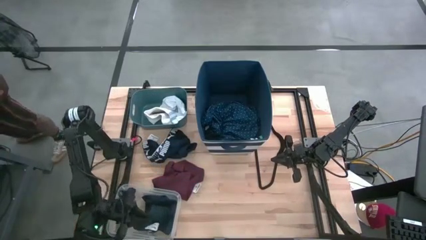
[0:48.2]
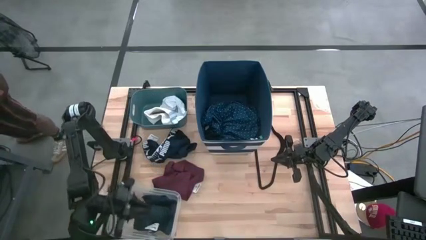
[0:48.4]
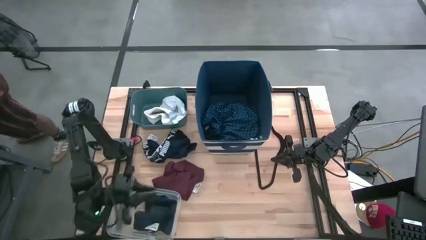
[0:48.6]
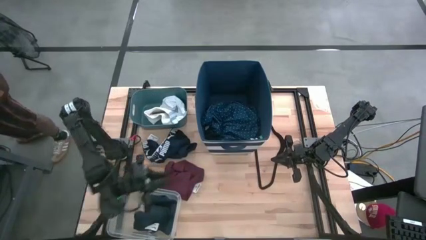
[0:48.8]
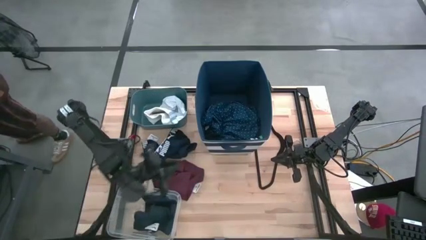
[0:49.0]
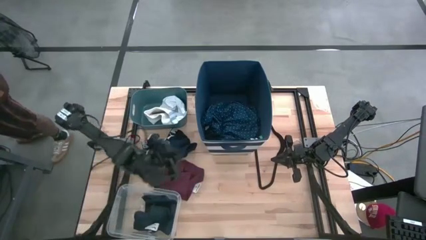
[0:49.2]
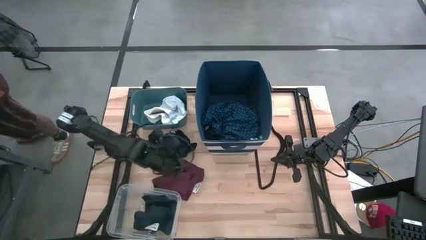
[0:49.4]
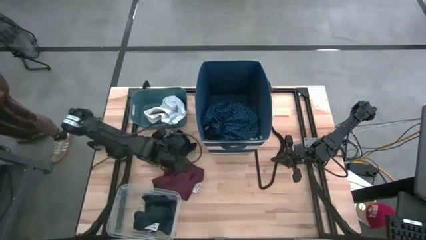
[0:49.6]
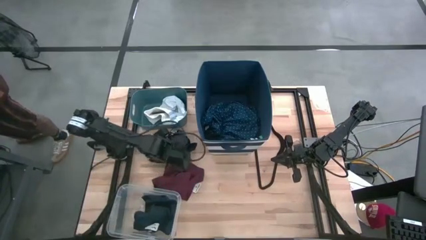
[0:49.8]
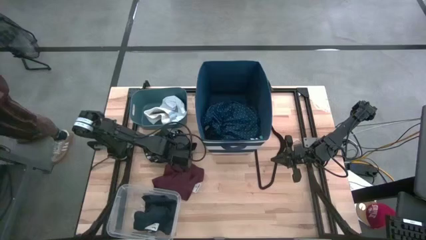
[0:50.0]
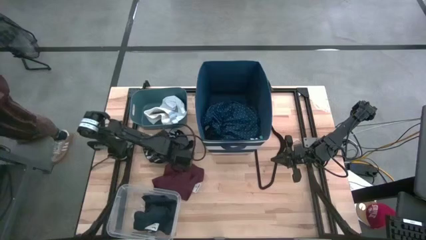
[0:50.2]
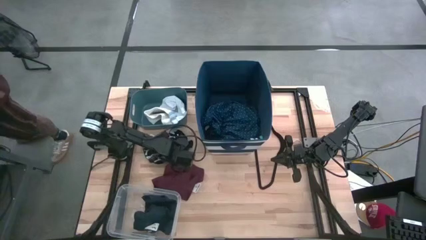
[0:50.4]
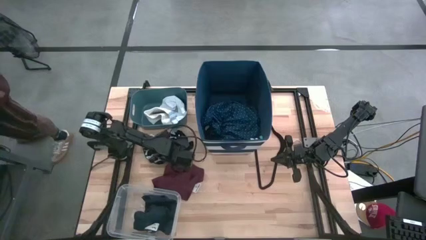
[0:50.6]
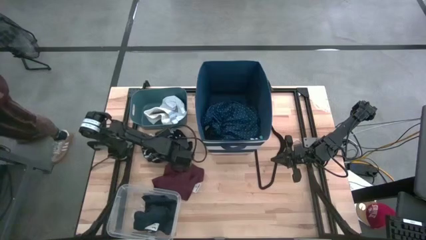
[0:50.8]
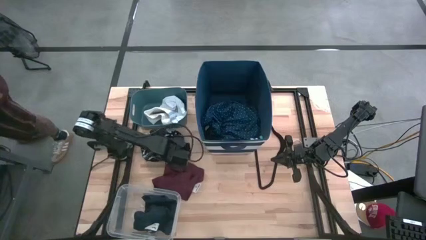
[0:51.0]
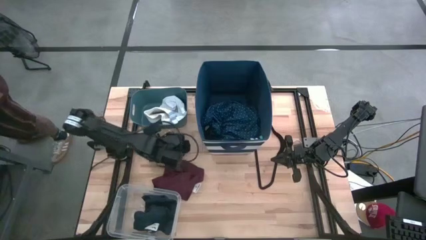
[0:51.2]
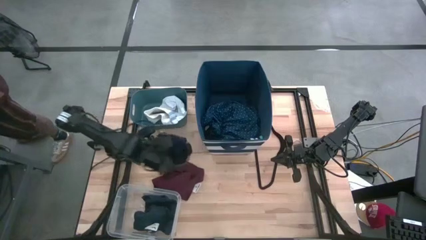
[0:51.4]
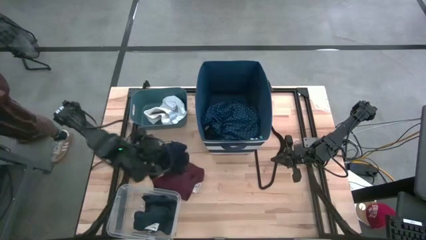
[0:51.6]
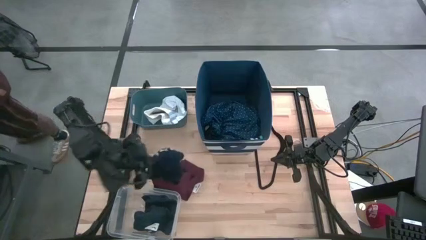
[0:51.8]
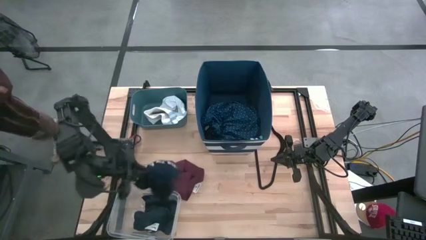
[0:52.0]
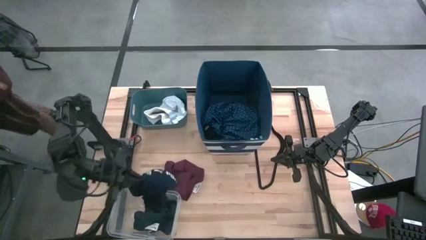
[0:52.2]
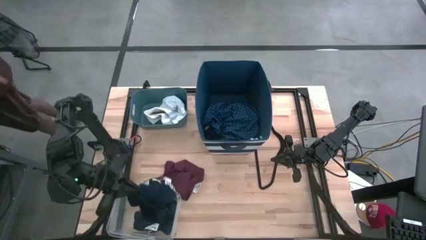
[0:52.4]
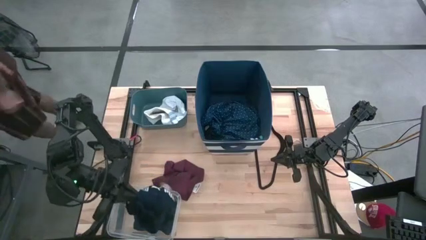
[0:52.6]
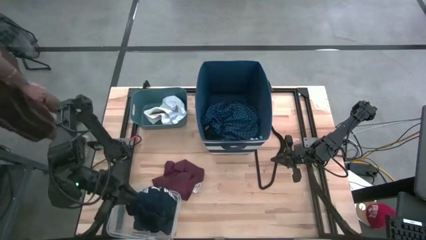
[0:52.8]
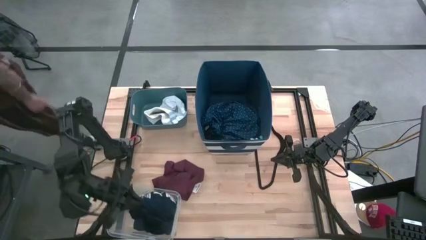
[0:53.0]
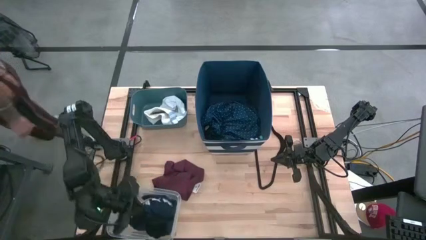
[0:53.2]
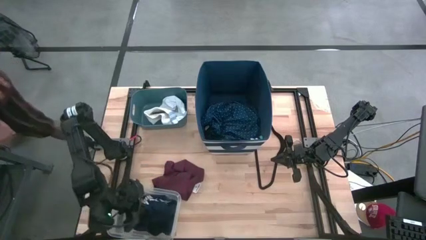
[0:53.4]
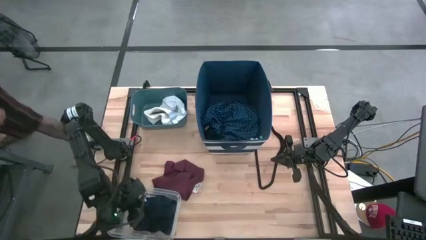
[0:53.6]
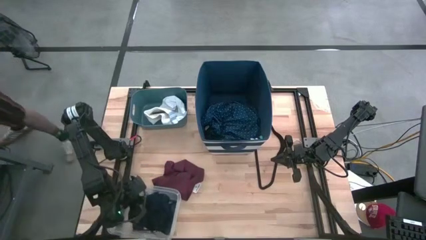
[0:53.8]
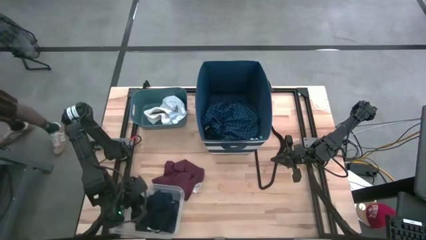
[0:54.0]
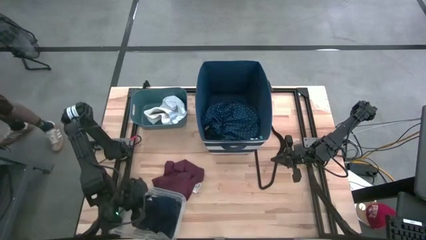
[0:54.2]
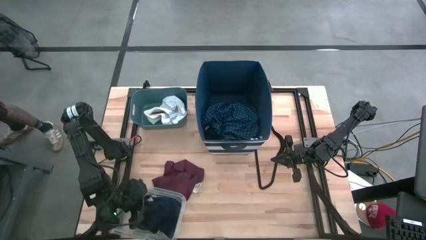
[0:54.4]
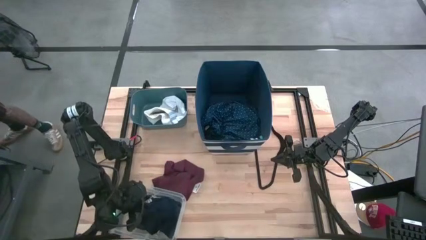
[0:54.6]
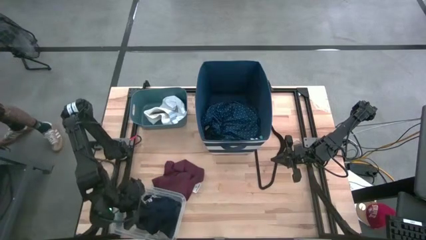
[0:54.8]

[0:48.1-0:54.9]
Task: Pick & Place Cloths
Put the dark blue boxer into the transparent bin

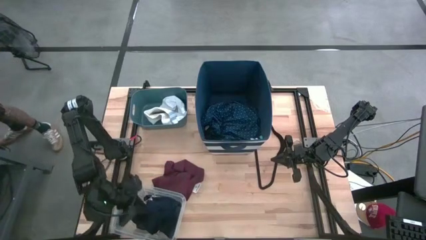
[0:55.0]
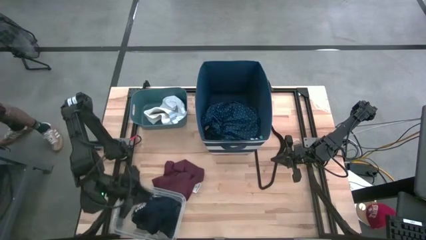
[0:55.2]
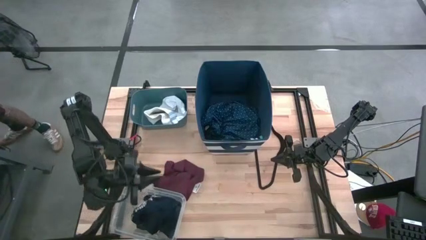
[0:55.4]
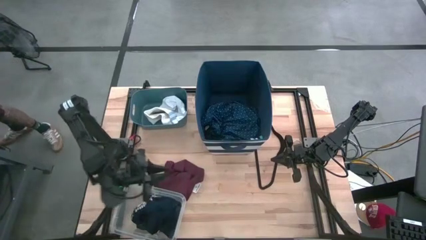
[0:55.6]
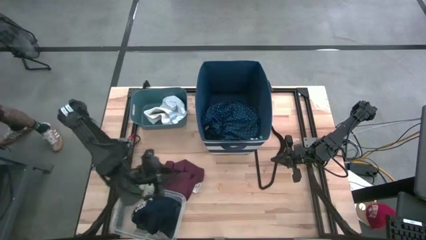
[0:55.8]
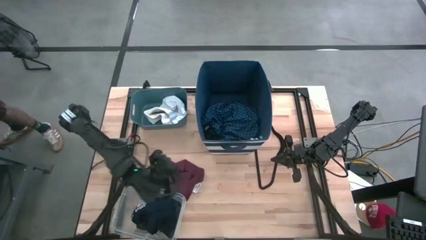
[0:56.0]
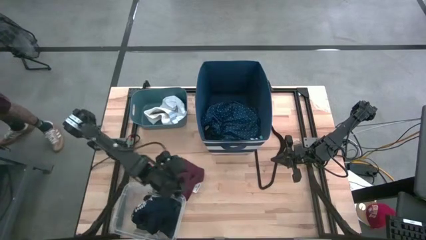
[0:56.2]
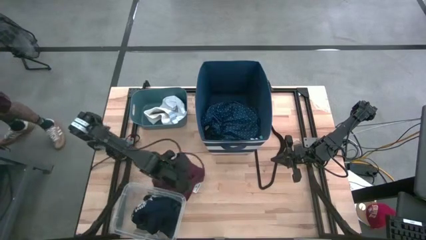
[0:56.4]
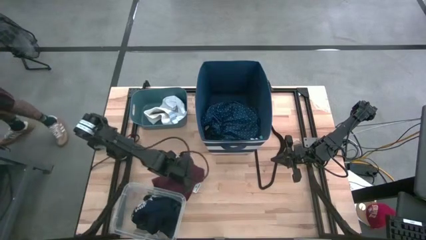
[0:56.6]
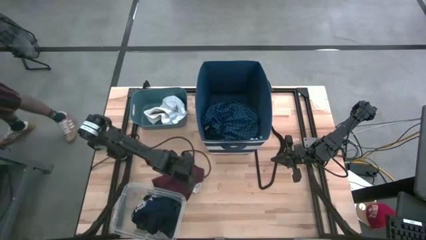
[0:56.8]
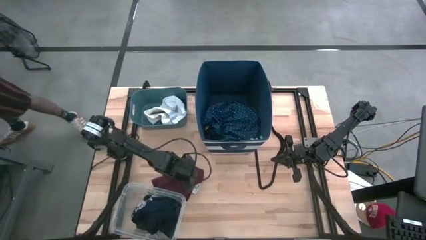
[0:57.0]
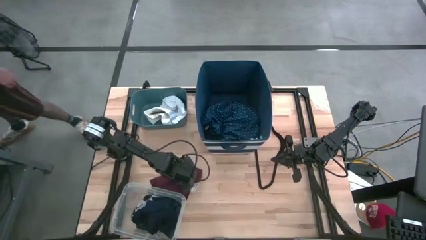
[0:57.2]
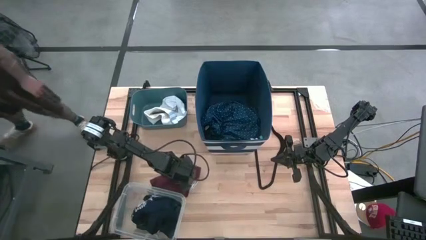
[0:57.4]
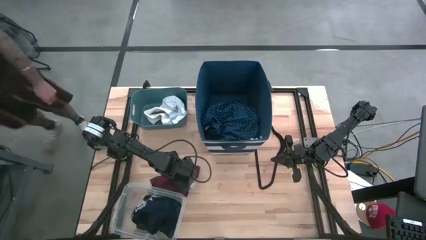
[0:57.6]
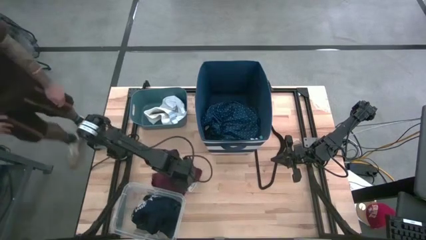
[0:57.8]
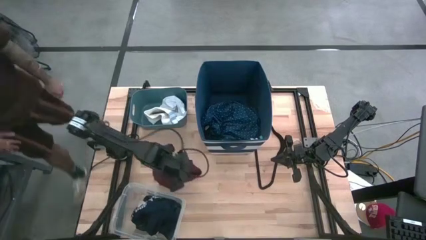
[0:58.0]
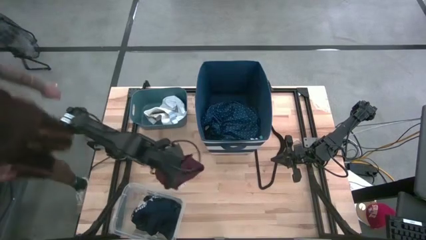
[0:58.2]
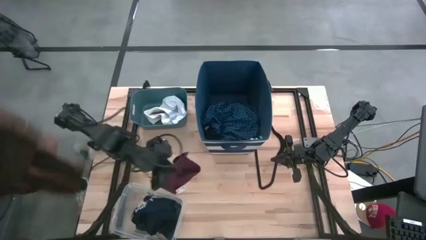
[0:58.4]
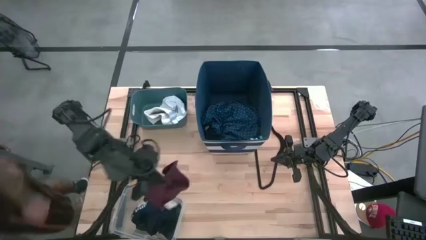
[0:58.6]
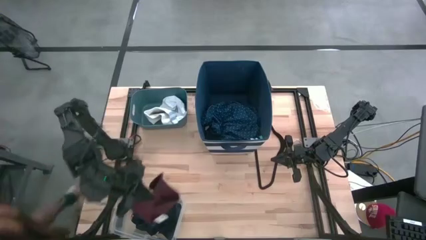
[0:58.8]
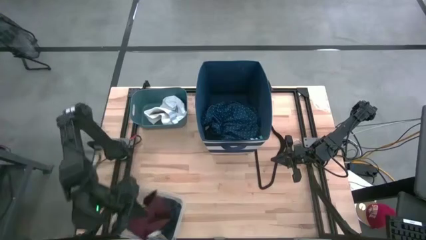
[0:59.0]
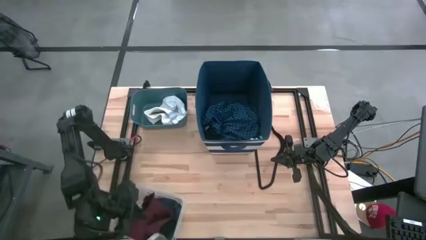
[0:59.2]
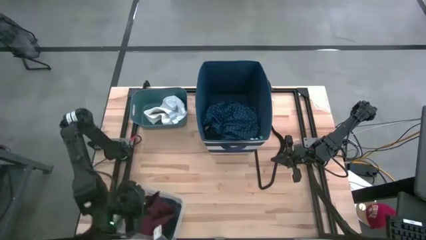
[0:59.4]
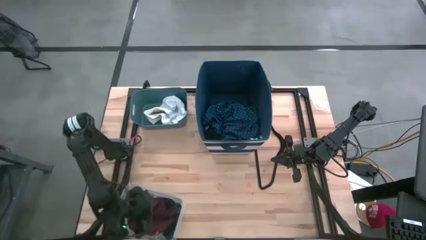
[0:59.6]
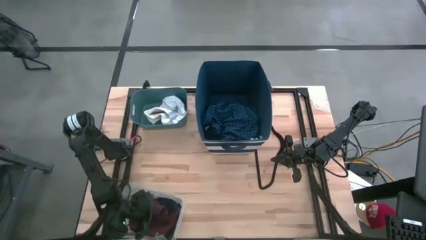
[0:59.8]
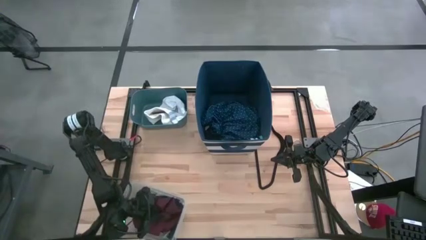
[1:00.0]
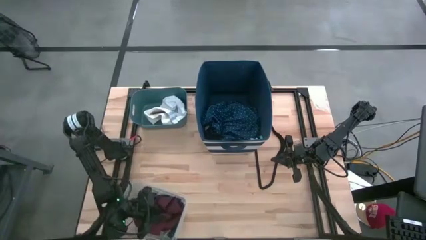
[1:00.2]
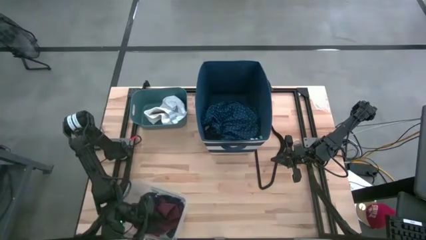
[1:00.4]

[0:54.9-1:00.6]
Put the dark red underwear into the transparent bin

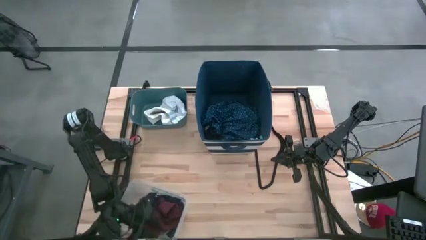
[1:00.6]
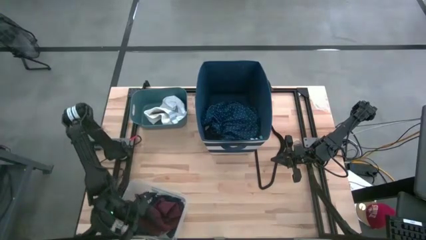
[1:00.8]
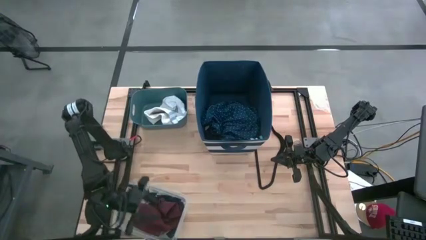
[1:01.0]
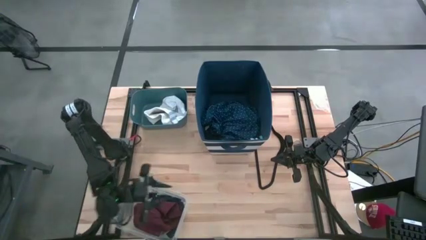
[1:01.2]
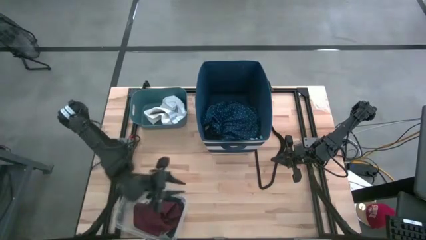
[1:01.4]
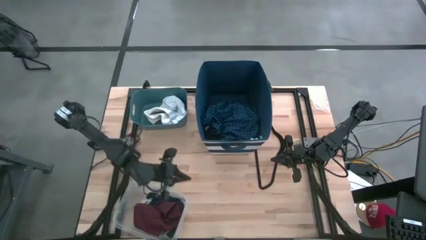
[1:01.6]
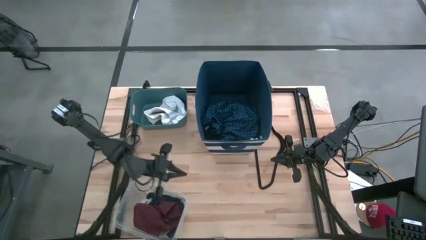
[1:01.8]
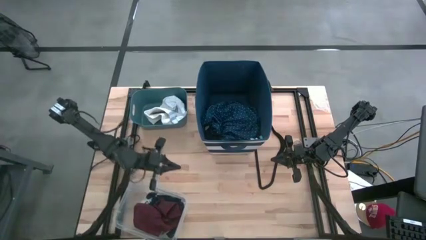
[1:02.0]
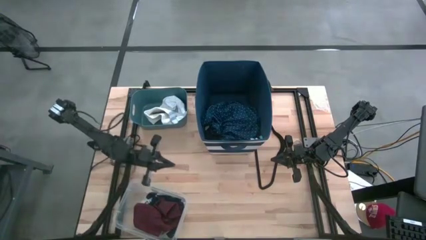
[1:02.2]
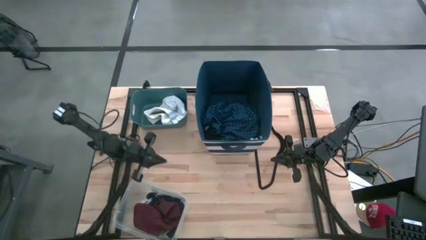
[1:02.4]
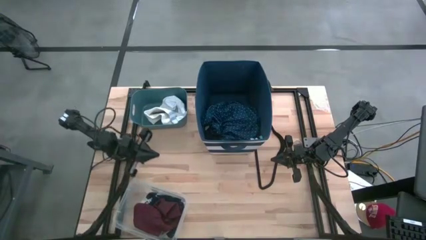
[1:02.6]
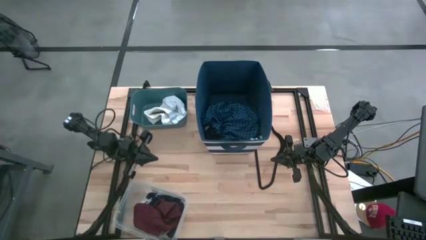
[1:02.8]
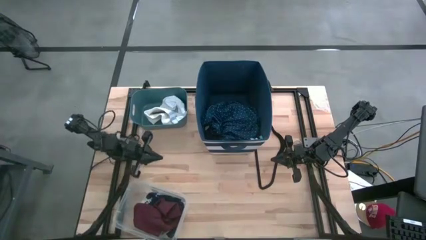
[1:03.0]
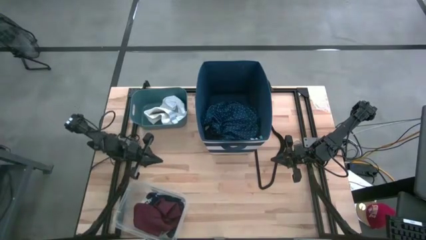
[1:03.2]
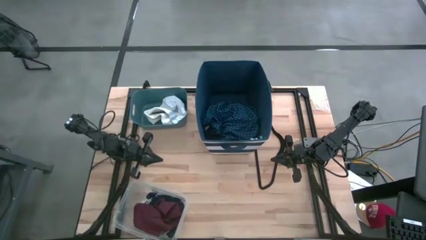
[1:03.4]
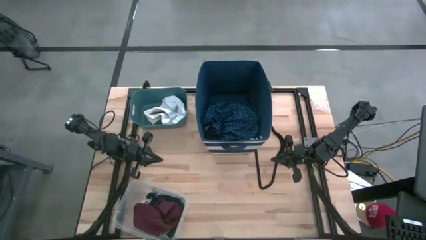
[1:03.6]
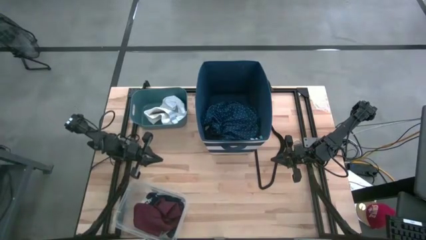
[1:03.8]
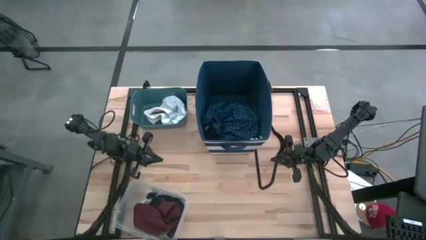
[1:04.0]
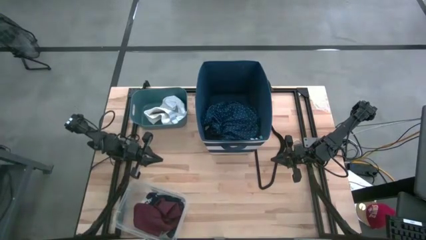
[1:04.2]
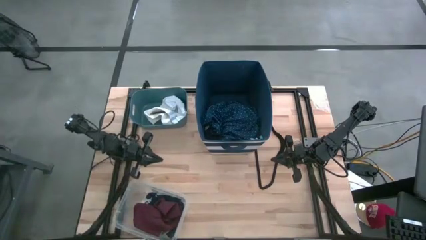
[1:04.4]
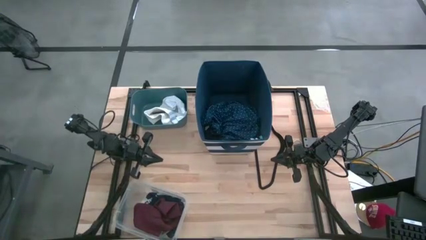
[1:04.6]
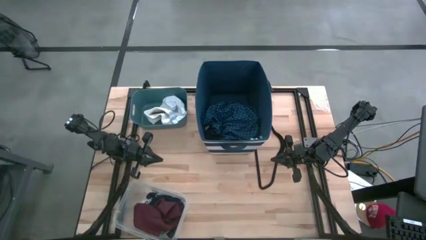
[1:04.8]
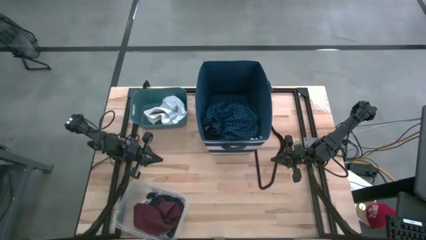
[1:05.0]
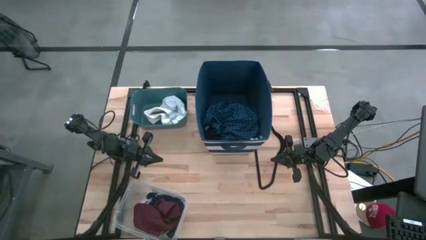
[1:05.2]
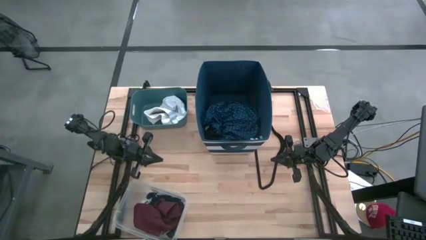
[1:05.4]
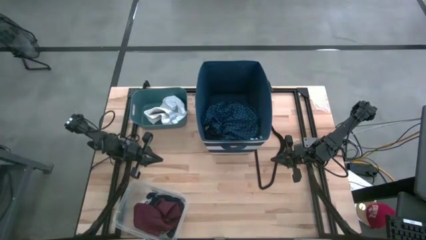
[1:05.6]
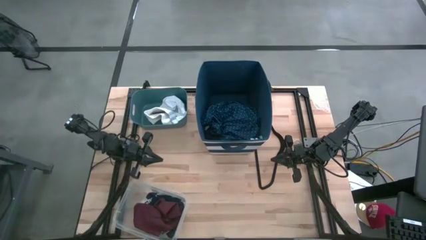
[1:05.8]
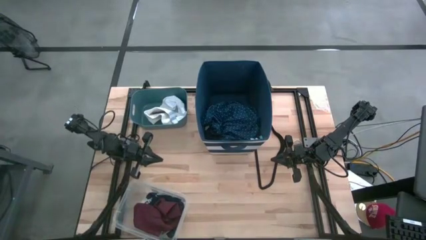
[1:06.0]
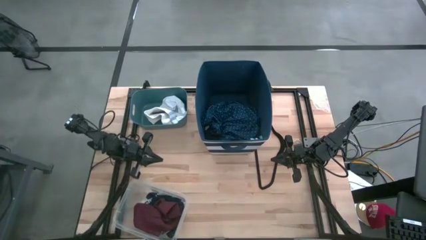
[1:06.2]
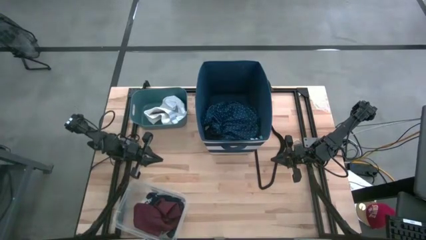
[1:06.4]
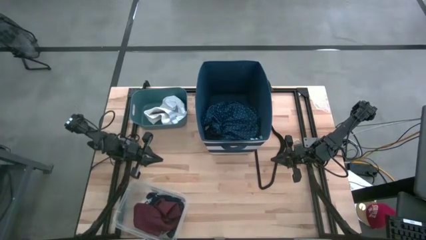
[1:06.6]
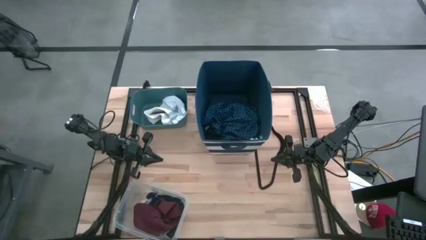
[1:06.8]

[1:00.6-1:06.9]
Return to Home Position
